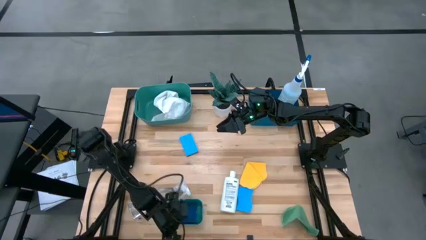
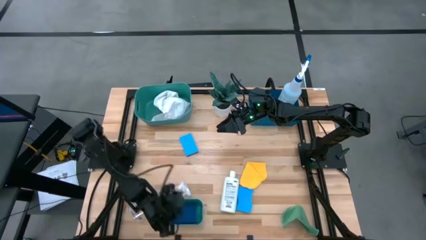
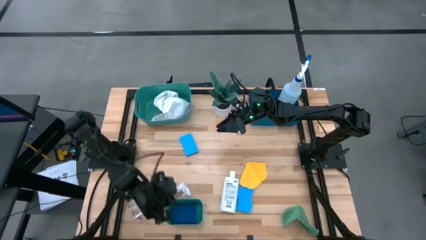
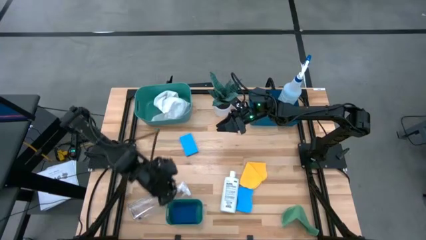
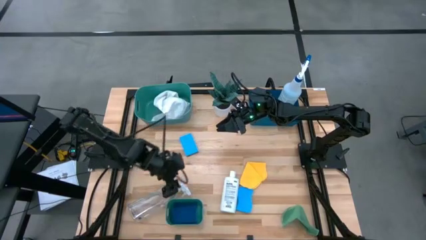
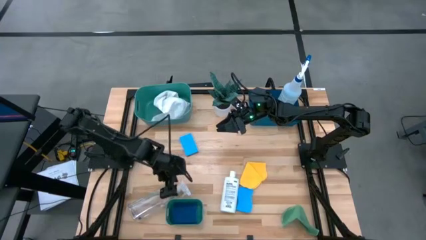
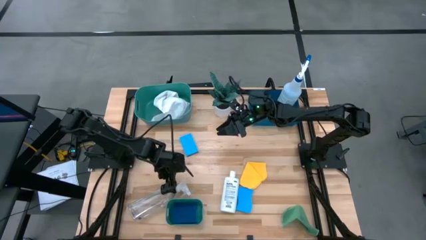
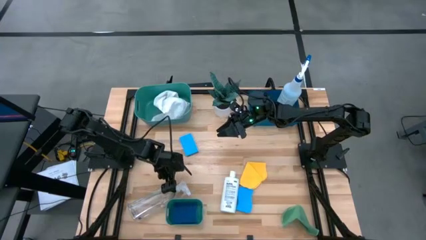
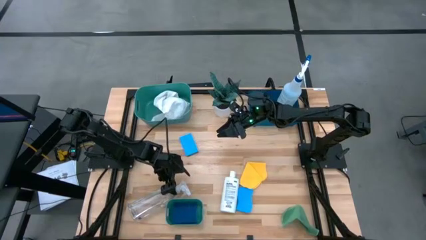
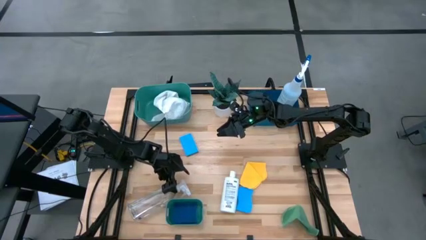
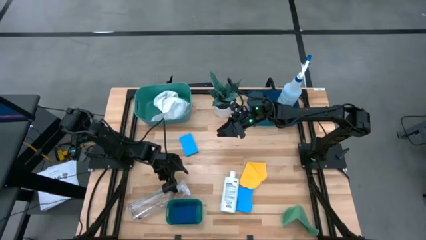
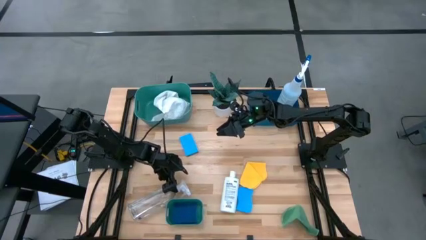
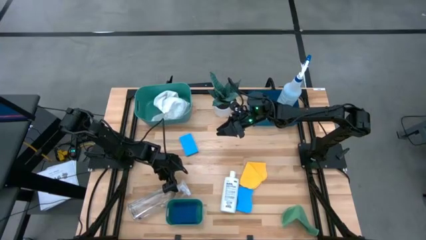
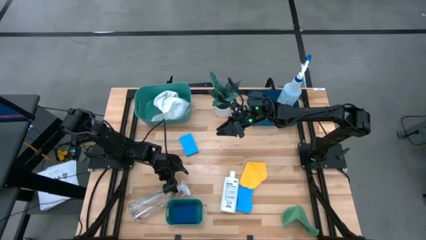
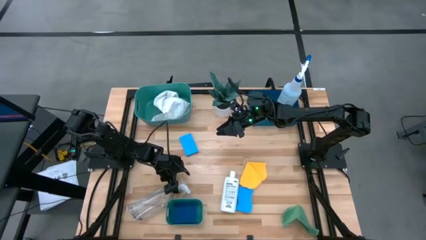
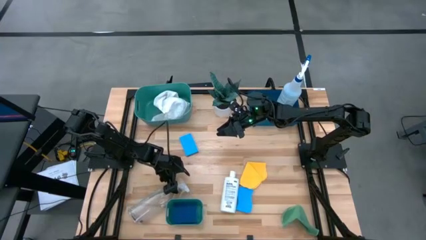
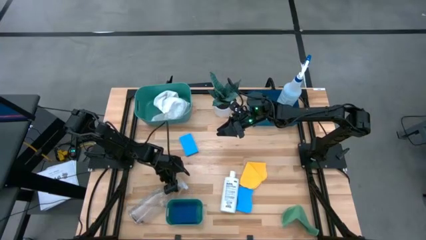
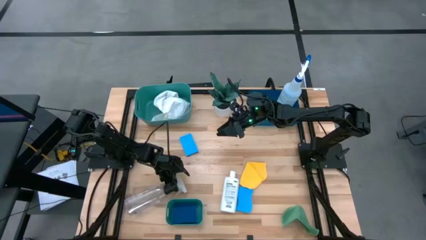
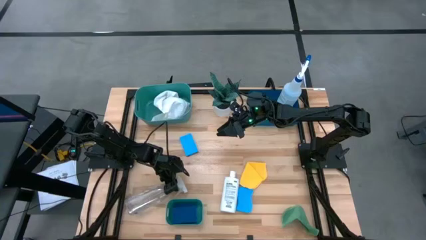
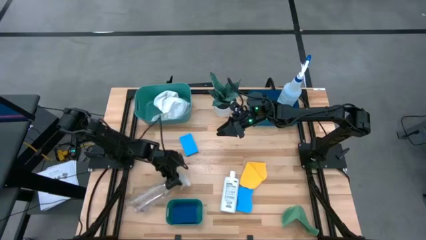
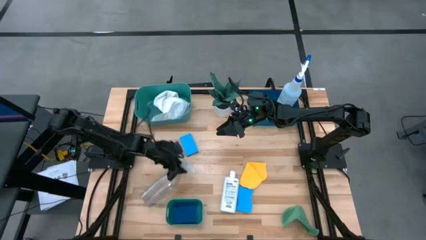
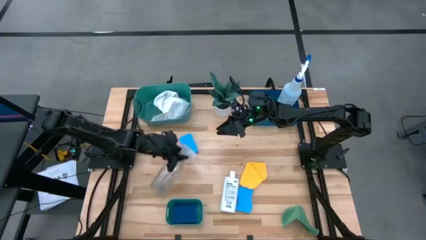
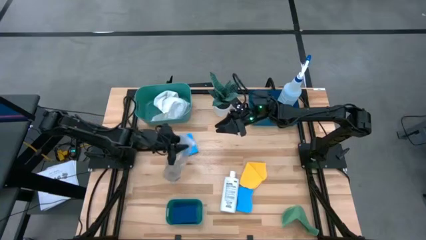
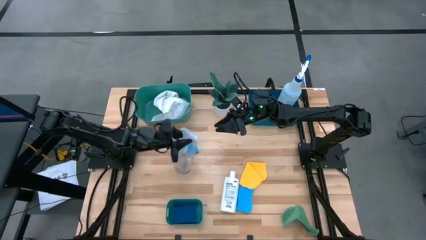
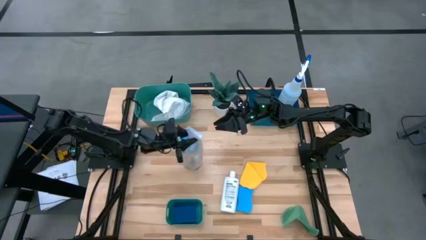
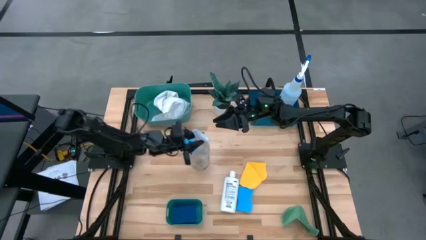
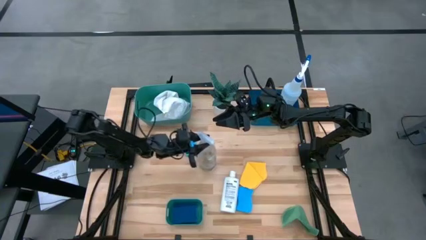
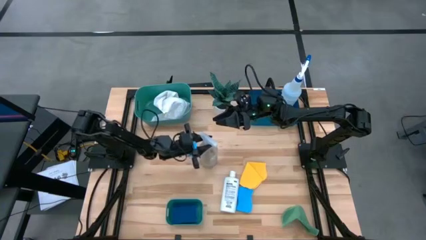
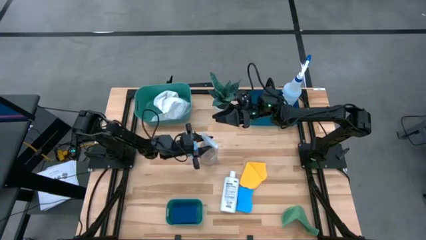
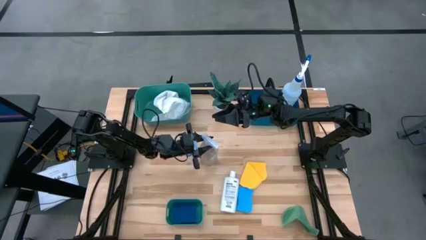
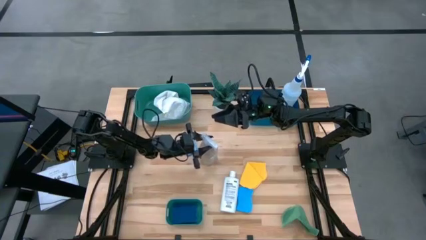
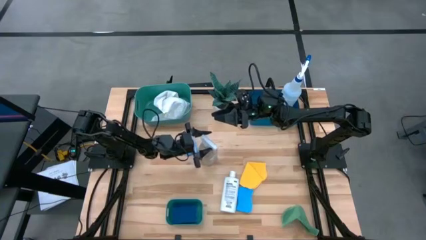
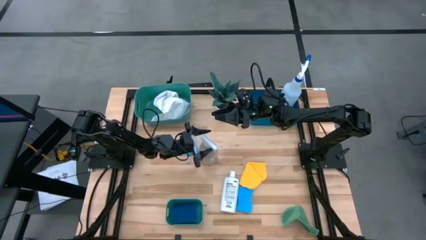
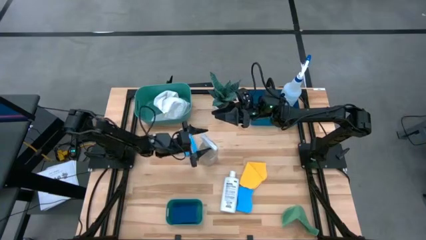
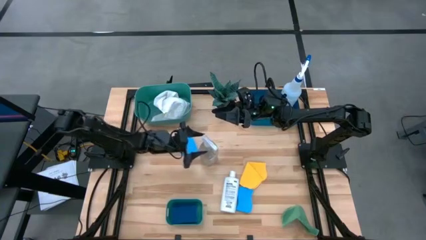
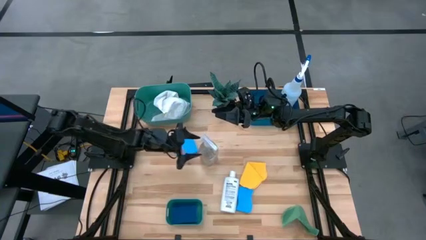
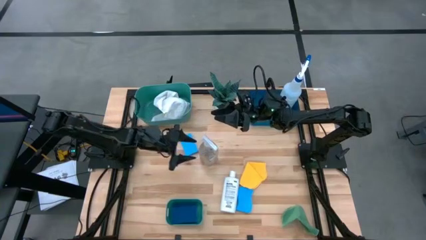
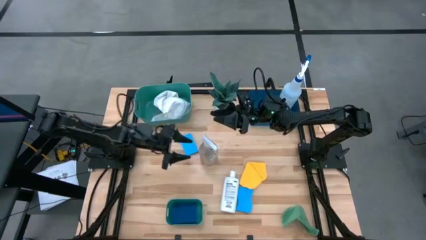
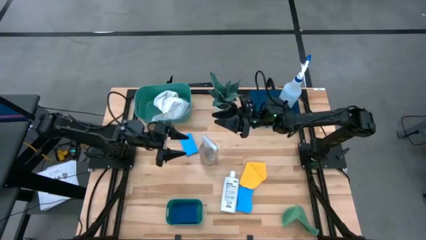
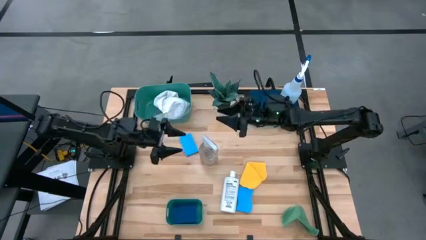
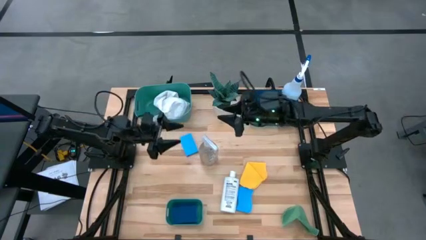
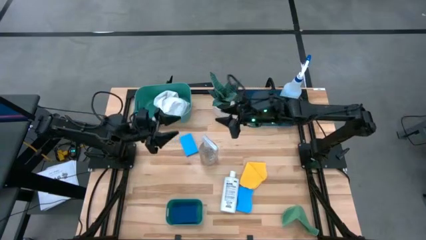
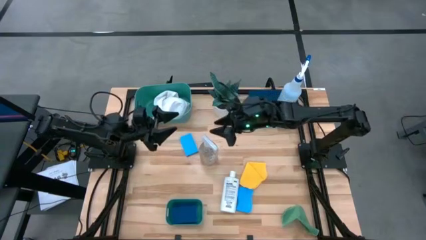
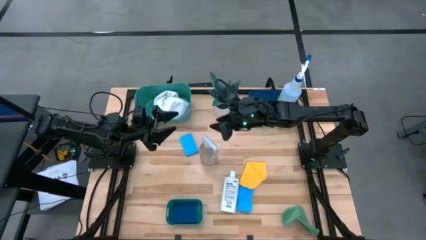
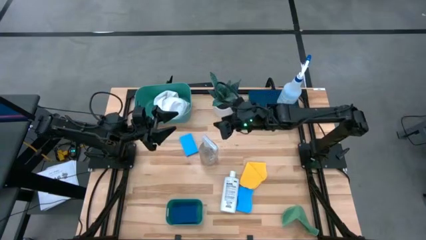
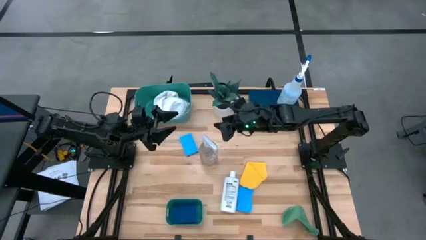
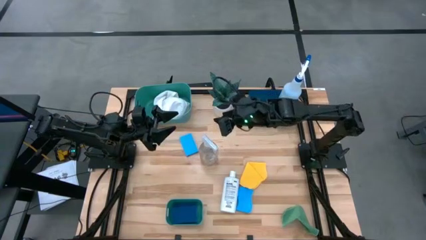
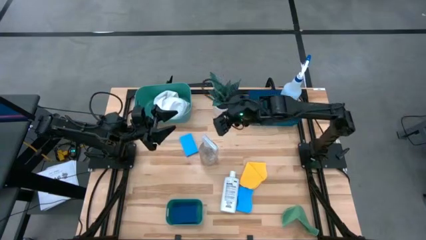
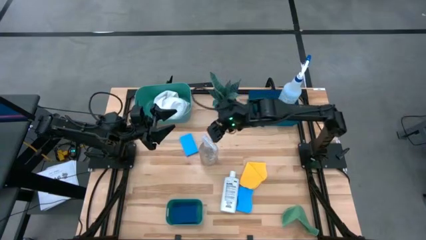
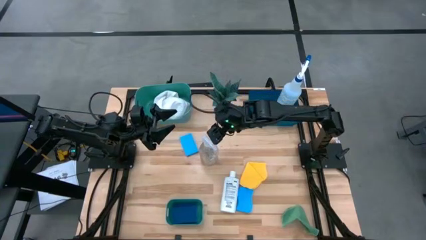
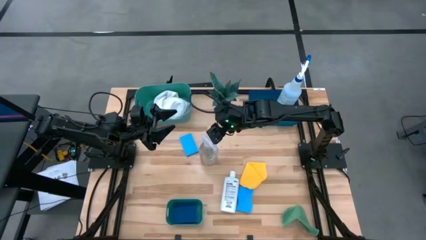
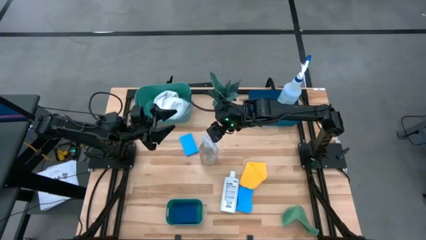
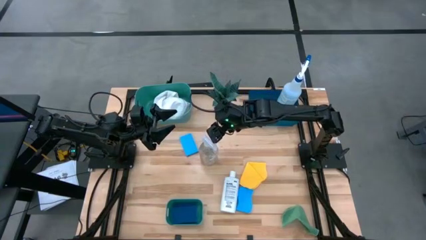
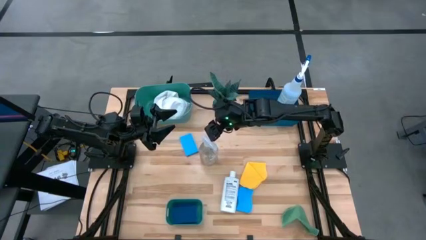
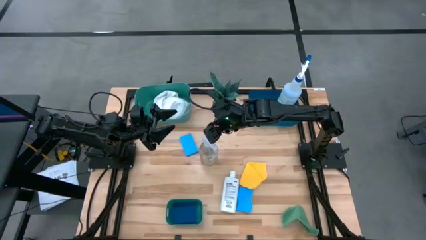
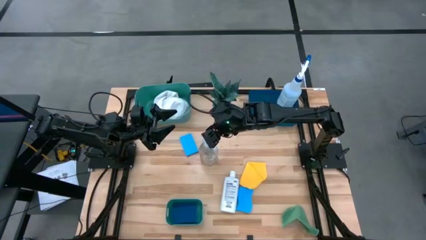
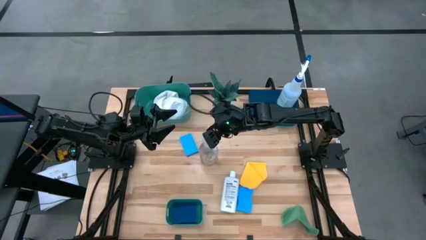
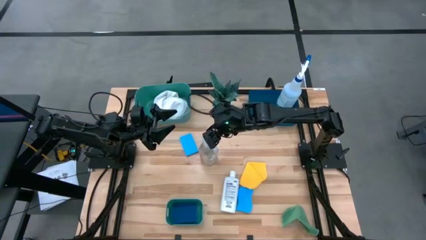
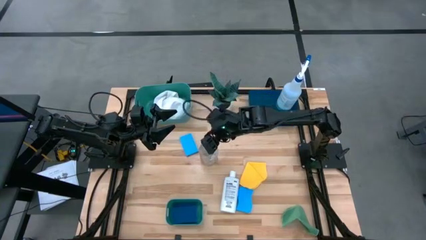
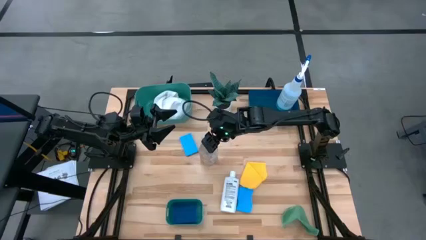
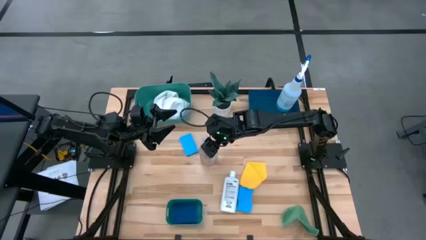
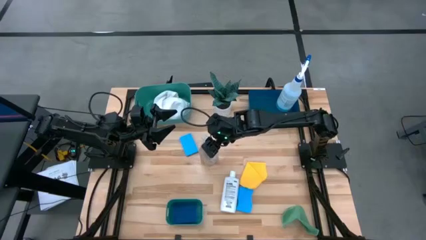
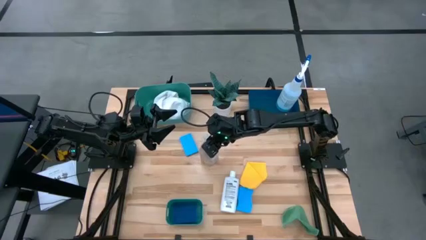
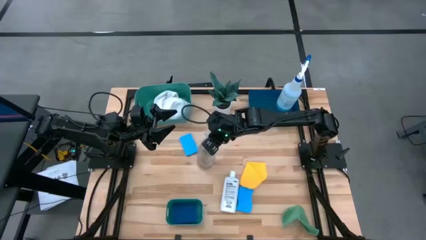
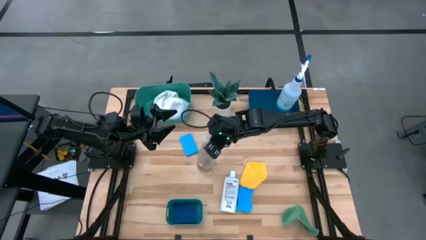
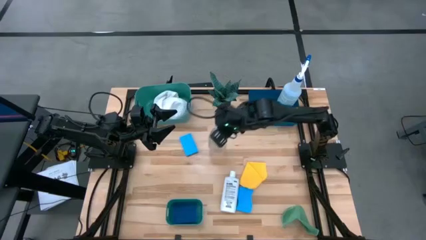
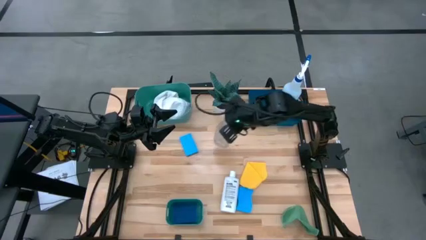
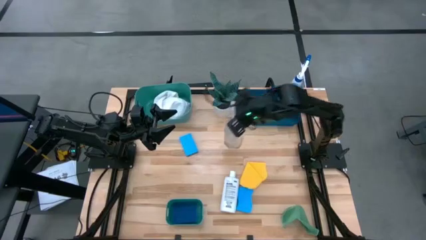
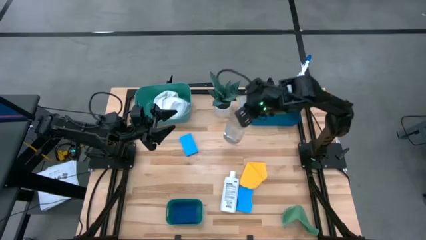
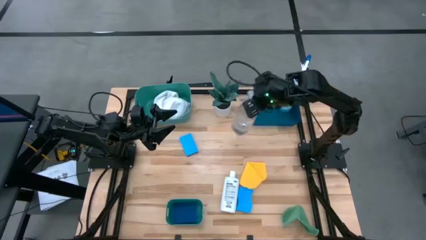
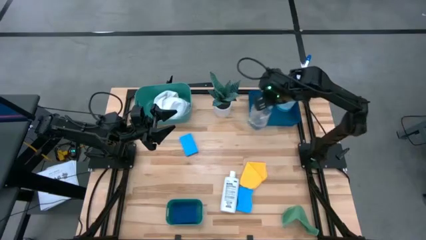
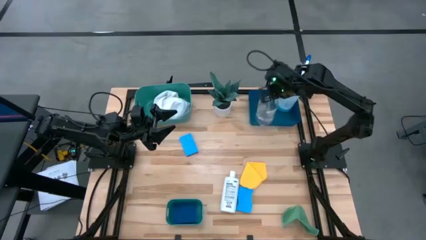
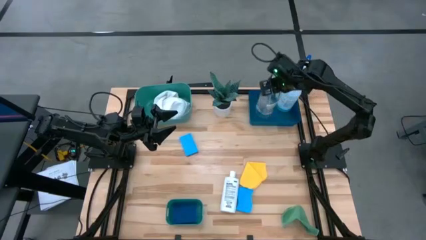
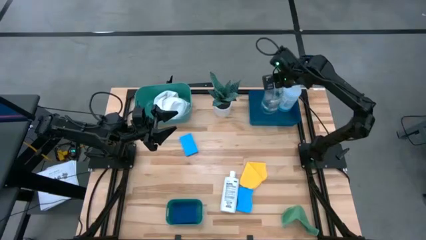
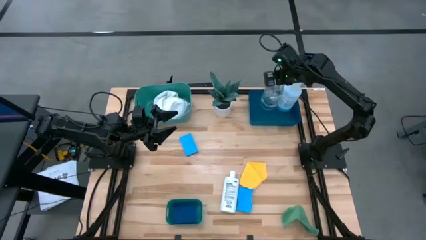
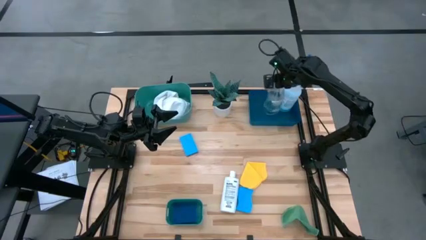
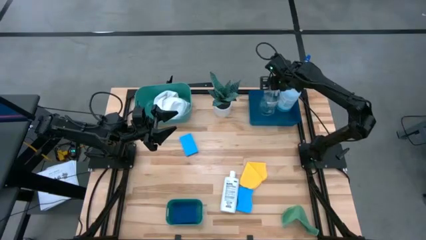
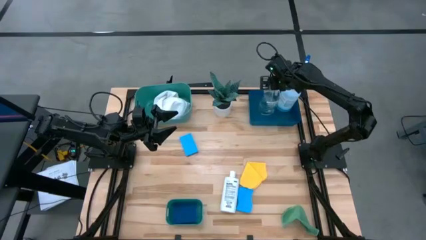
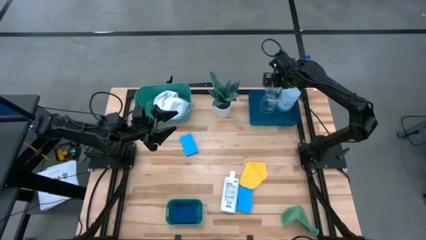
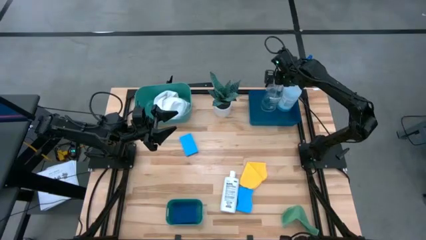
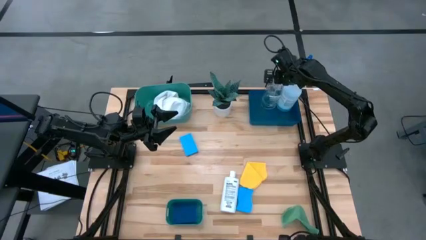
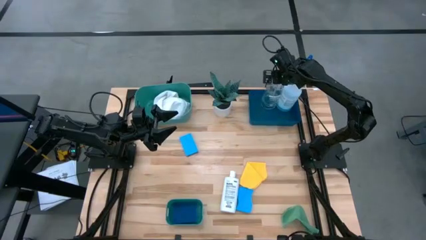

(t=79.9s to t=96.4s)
Task: Pick & Place Kitchen Items
Put the transparent spray bottle into the blue bin
